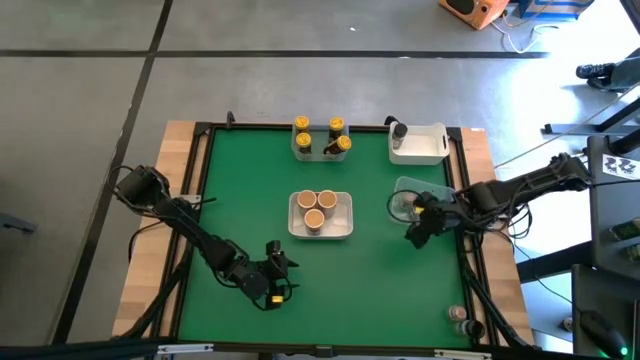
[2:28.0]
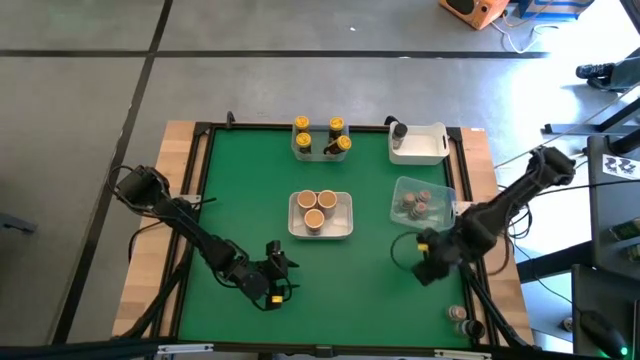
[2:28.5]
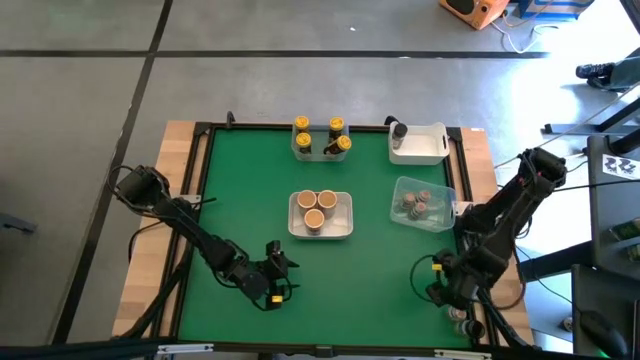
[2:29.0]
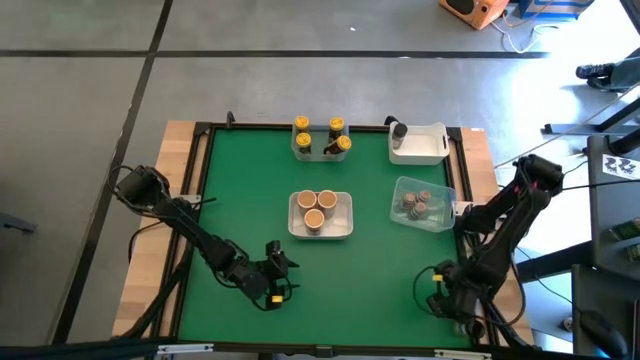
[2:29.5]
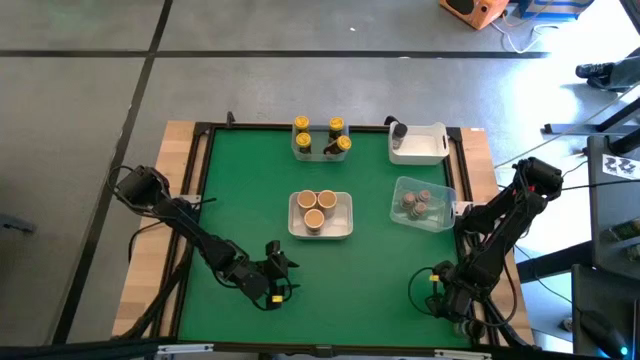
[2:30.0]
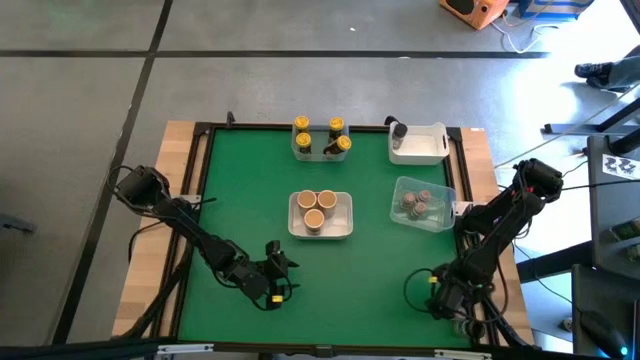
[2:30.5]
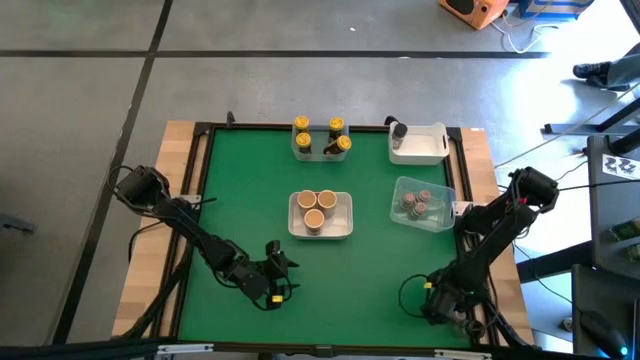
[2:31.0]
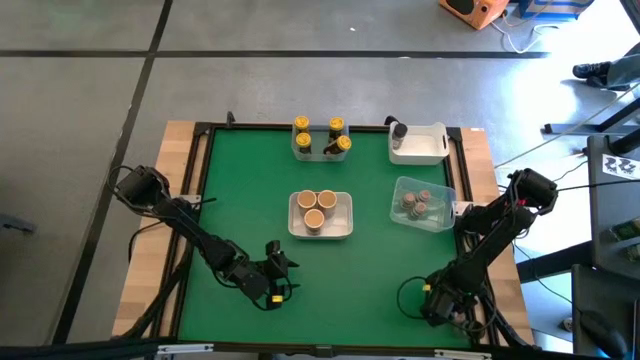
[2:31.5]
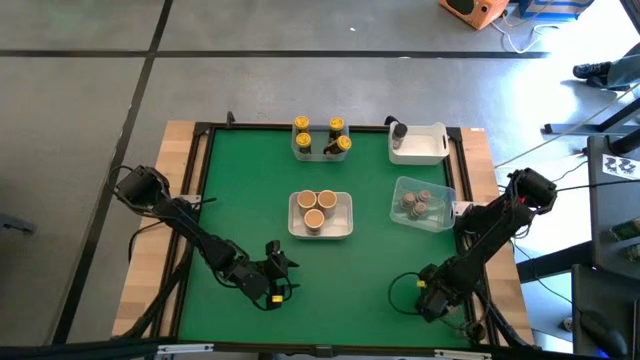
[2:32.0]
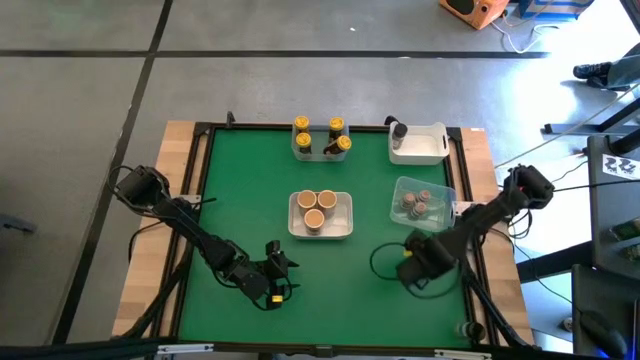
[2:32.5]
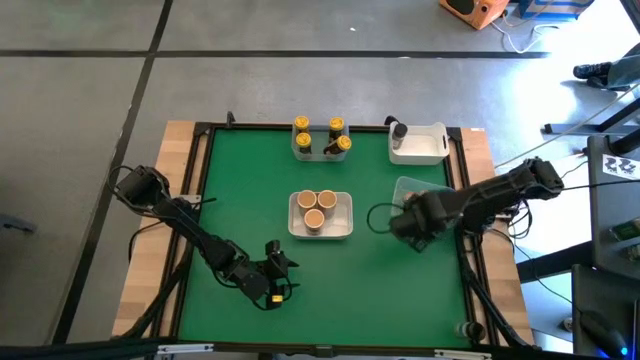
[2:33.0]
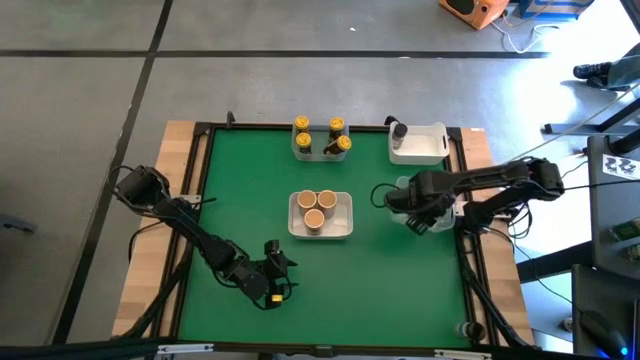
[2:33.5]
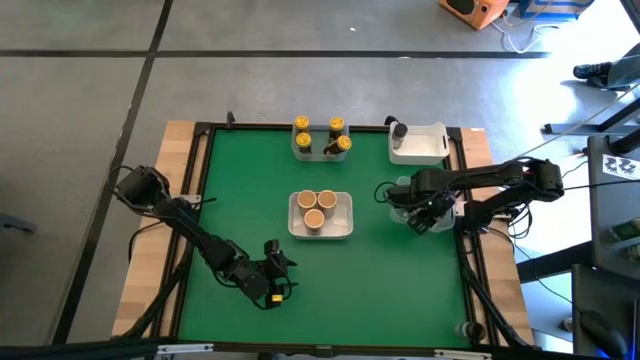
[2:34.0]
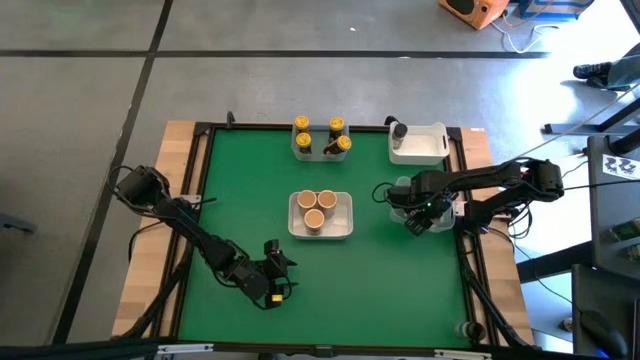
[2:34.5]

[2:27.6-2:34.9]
Task: Sort spices by type
Put the brown seasoning bottle into the bottom transparent bin

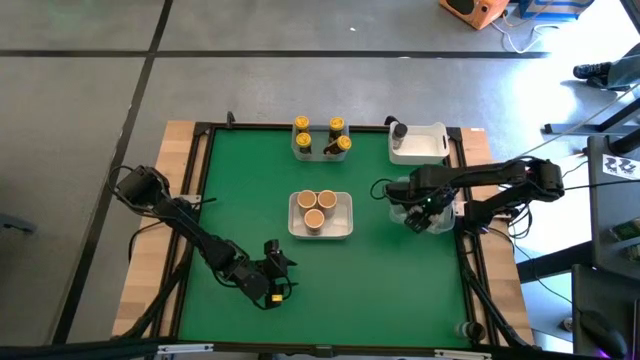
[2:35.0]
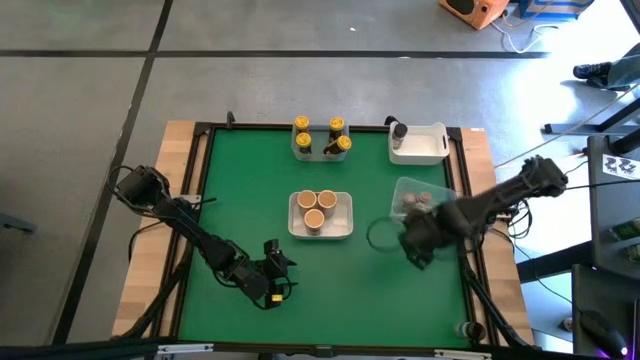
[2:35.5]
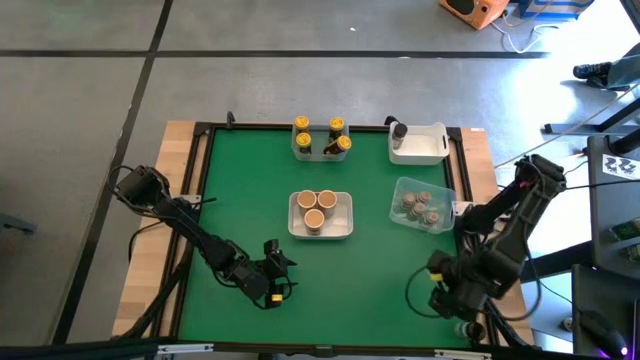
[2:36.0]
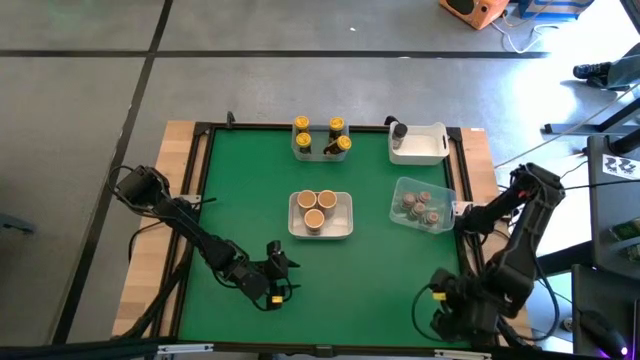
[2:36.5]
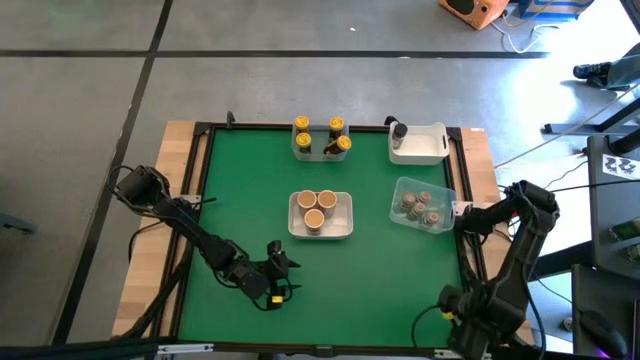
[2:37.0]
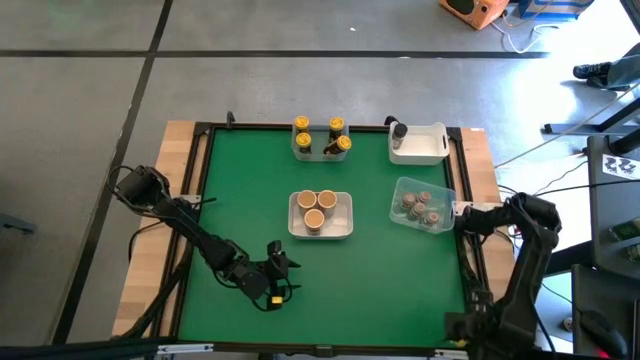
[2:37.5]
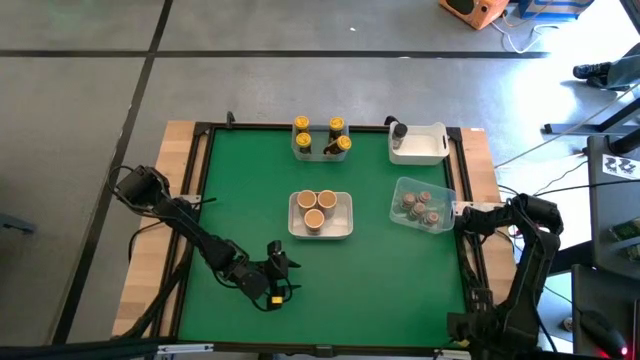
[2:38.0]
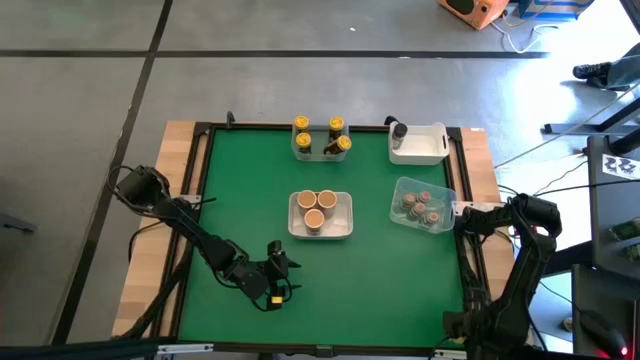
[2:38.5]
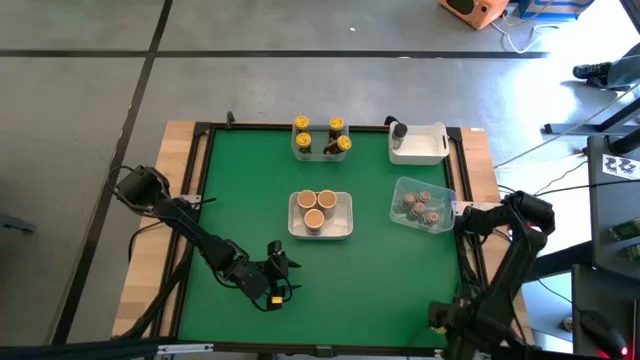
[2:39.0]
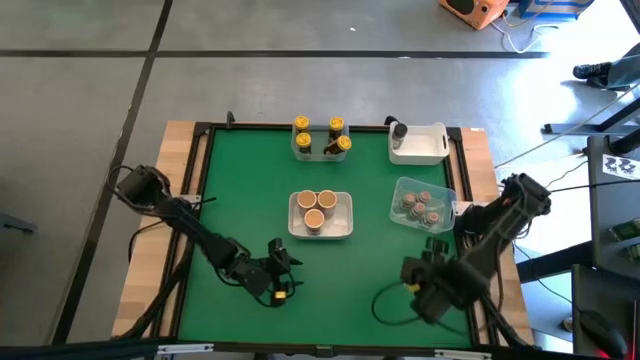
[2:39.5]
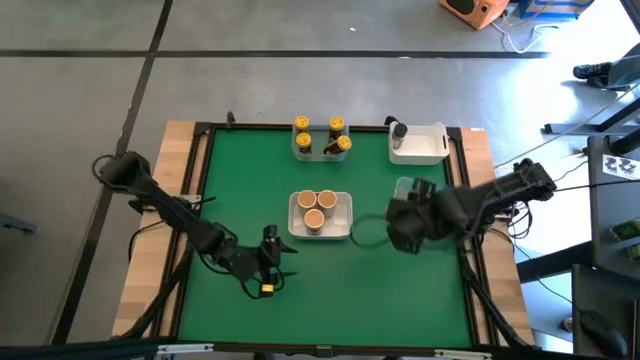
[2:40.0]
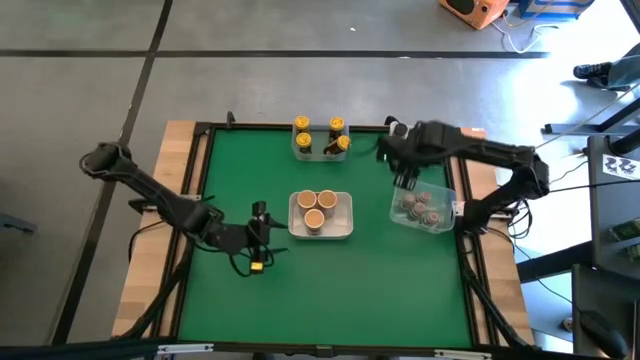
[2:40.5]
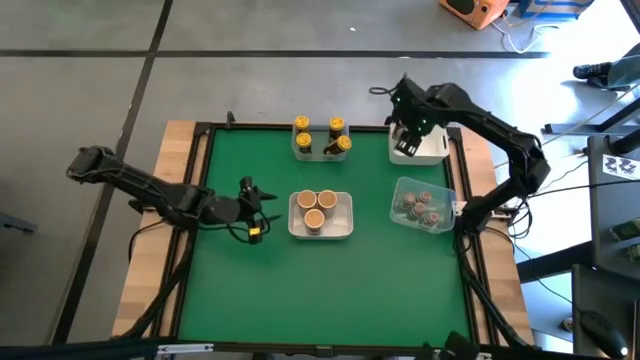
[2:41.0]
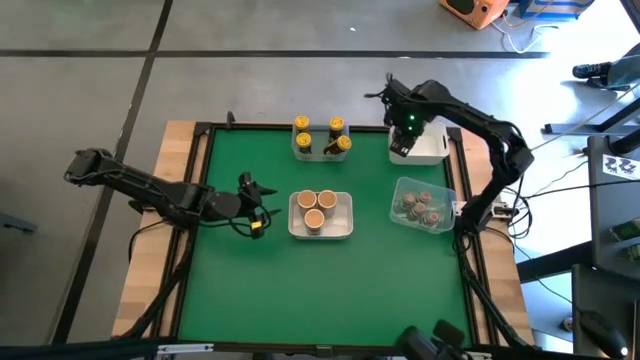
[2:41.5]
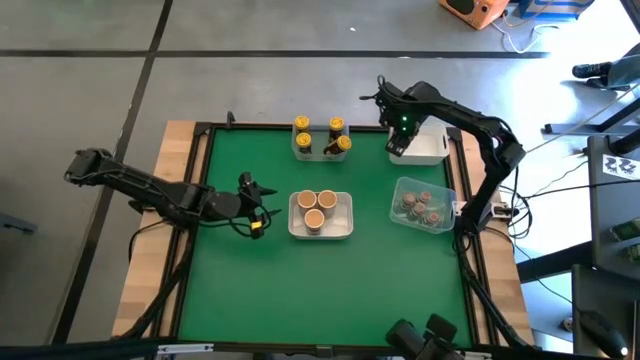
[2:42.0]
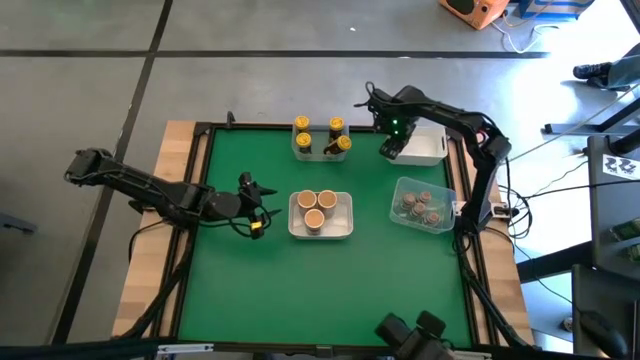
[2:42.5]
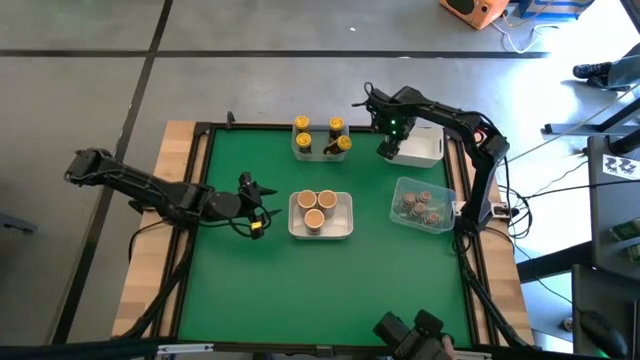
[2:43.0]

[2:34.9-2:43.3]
Put the black seasoning bottle into the top white bin

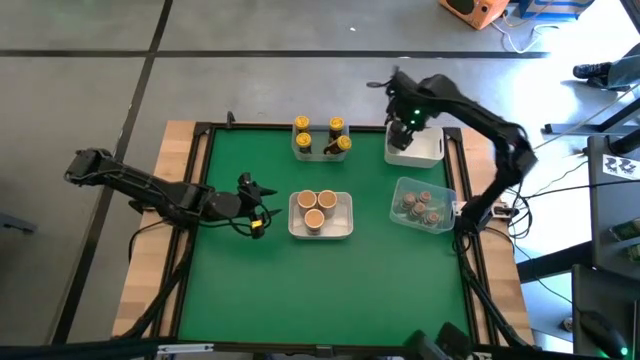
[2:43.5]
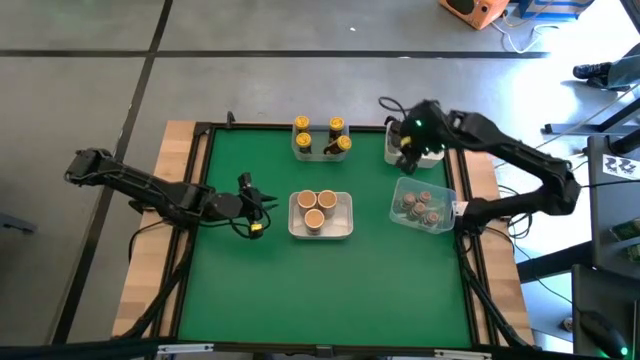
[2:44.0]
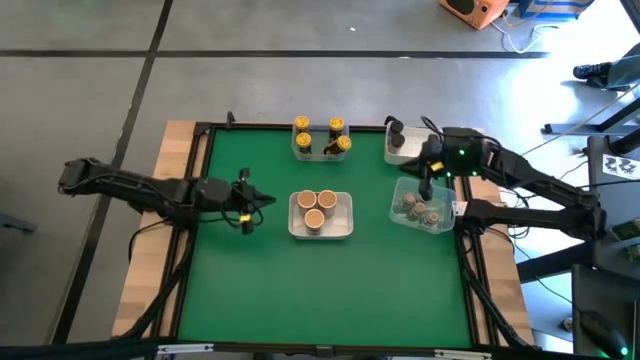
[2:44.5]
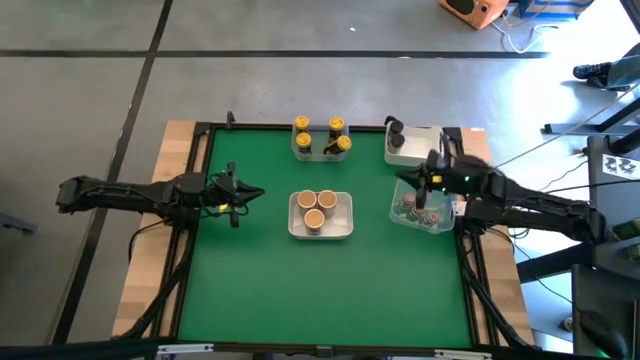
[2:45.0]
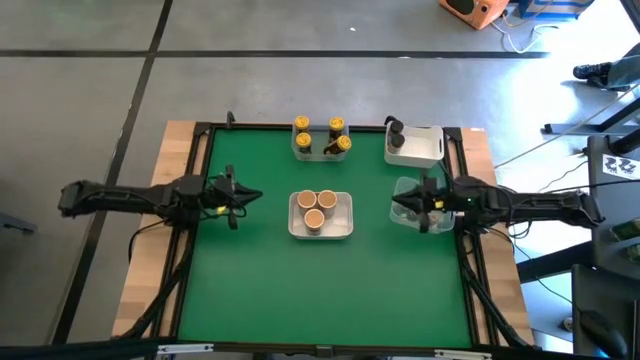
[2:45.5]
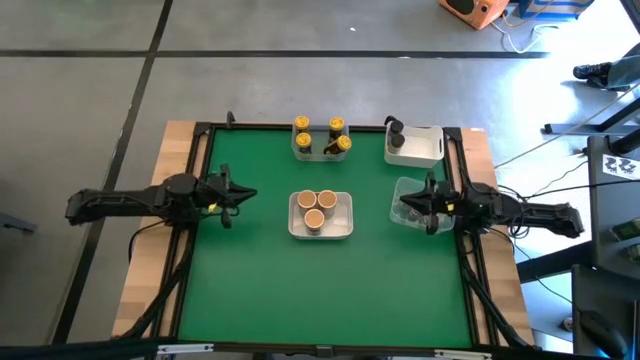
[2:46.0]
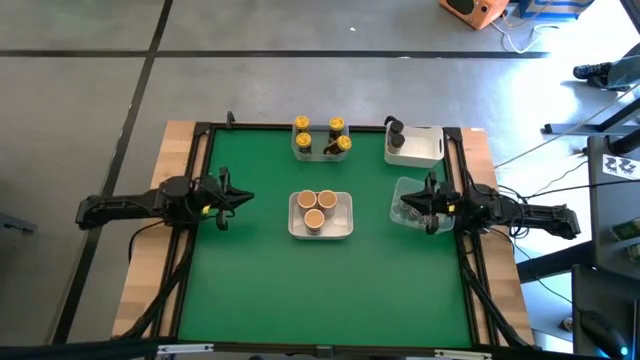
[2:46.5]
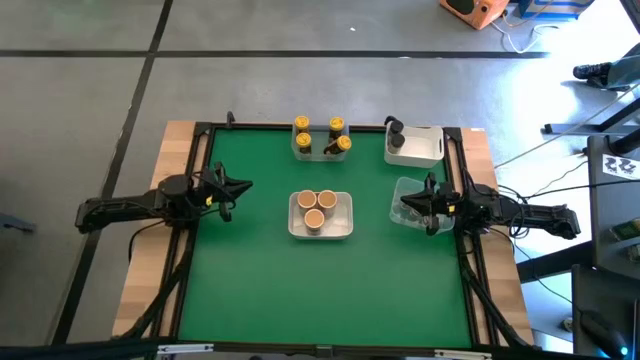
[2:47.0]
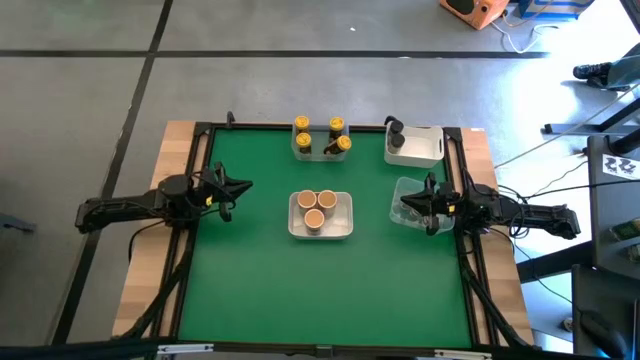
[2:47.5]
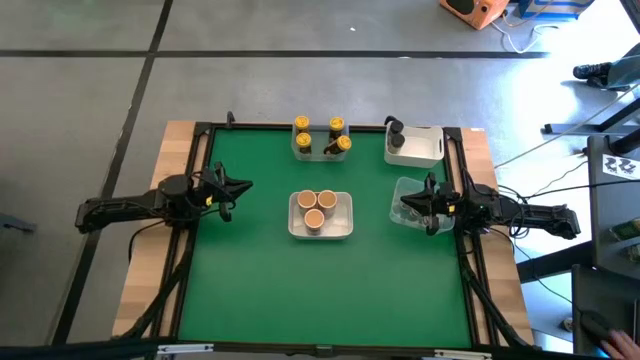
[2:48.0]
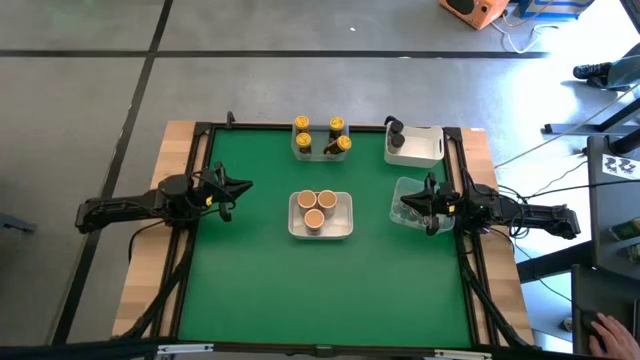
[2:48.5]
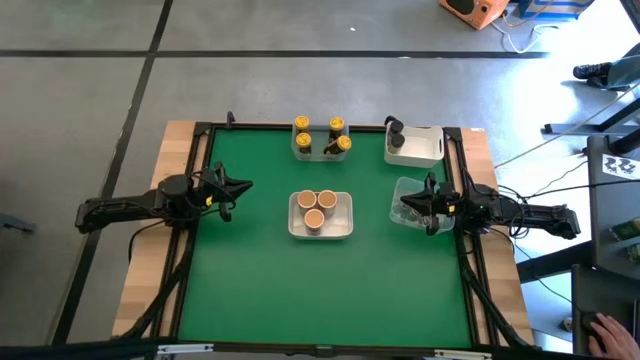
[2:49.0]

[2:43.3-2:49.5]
Return to Home Position
